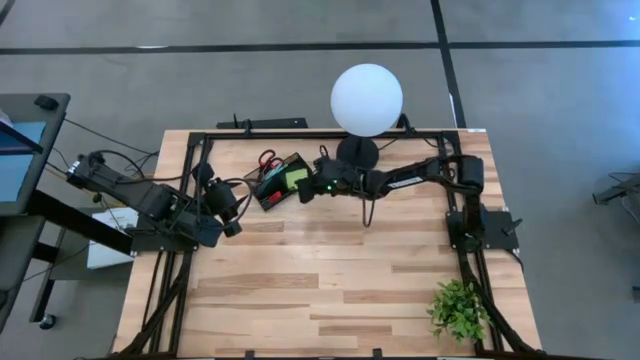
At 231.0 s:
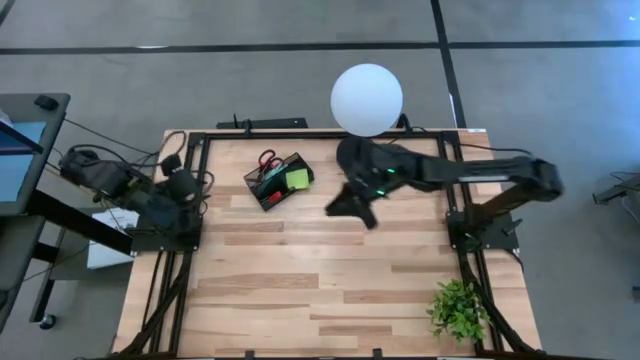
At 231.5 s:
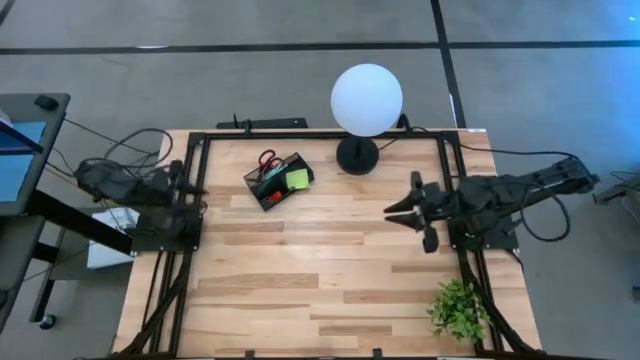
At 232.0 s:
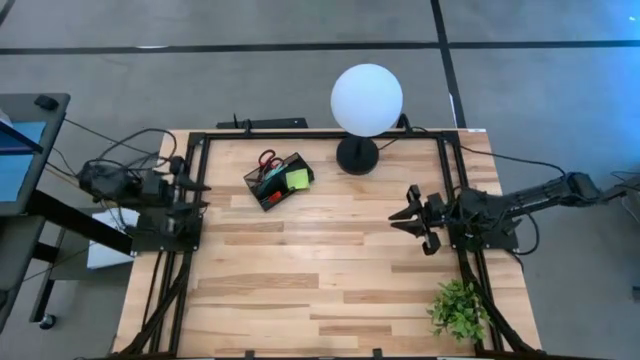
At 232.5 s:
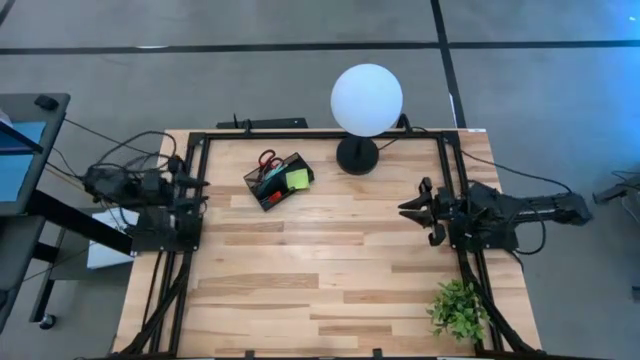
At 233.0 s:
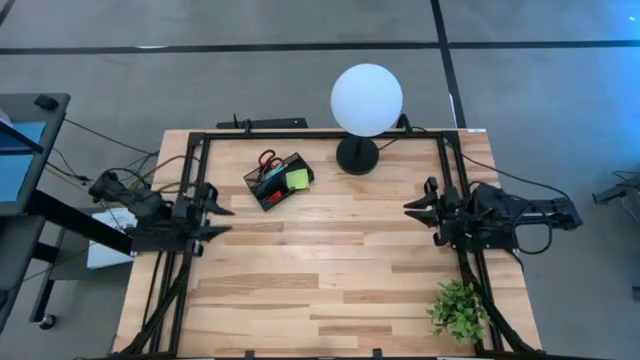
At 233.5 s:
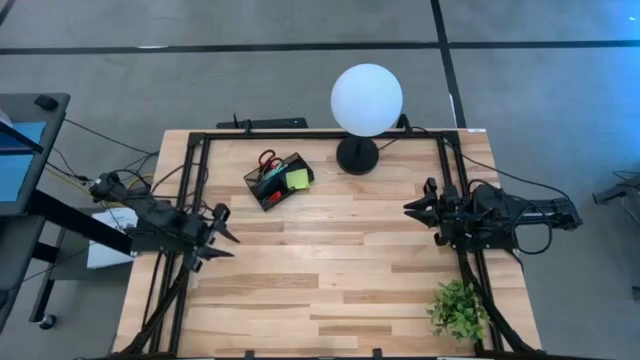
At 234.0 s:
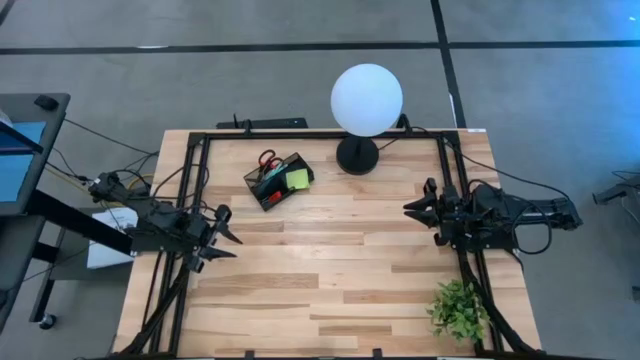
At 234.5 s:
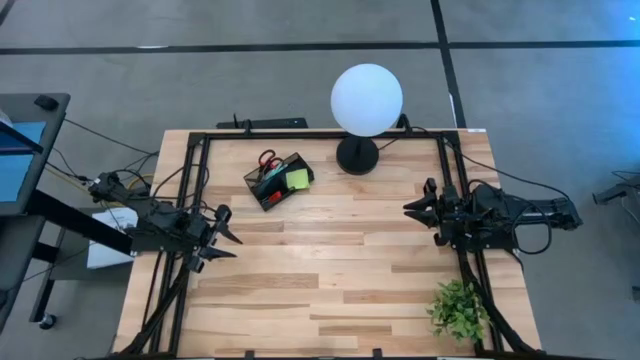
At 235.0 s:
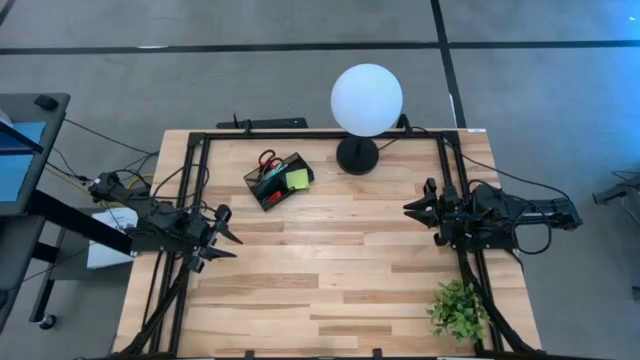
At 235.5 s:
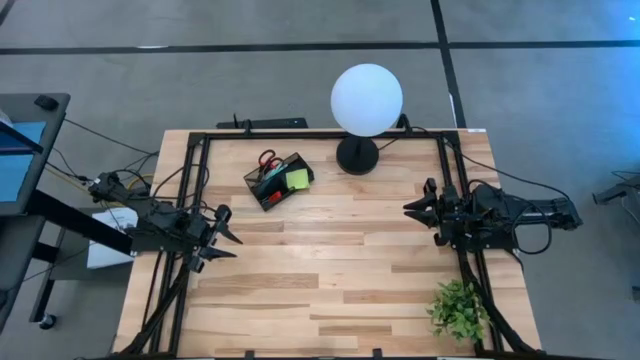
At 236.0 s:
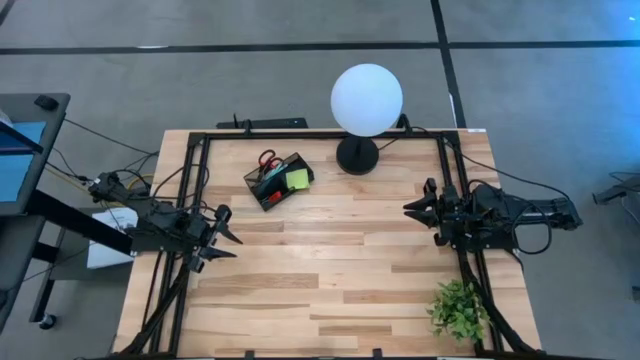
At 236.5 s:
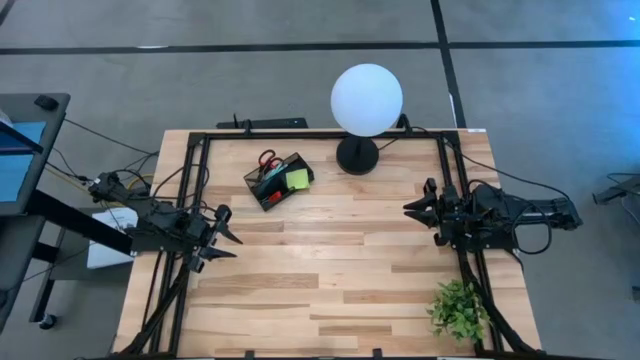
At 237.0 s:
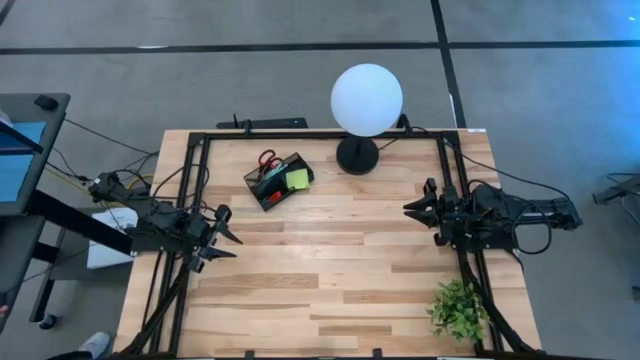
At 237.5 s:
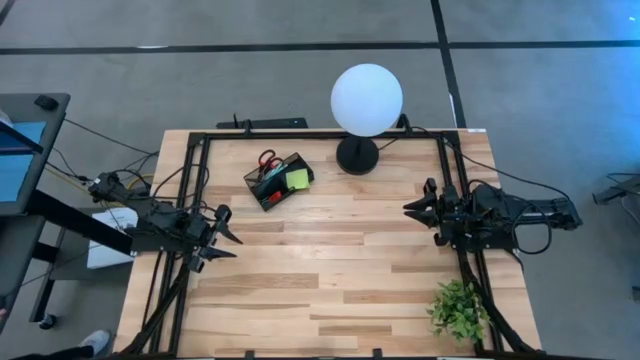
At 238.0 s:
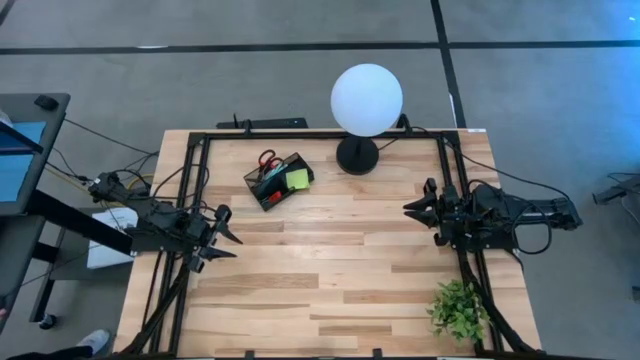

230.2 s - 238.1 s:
Task: Pick and place office supplies into organizer
Return to Home Position

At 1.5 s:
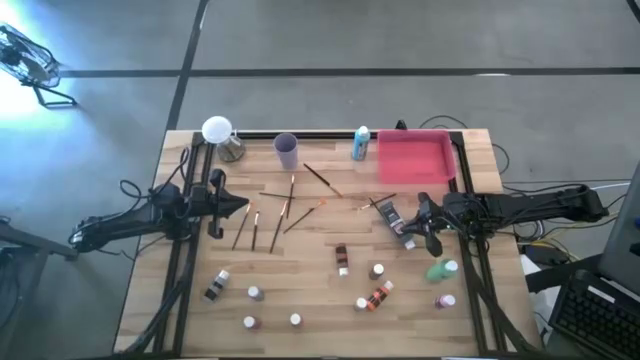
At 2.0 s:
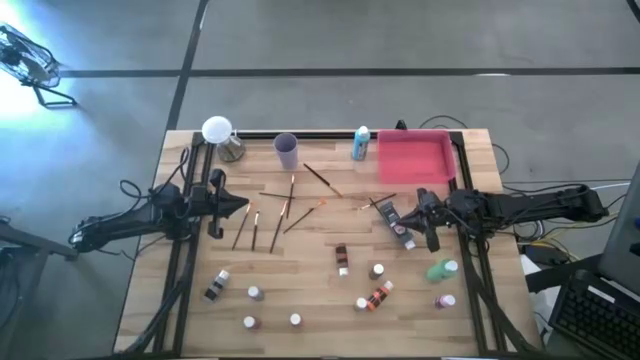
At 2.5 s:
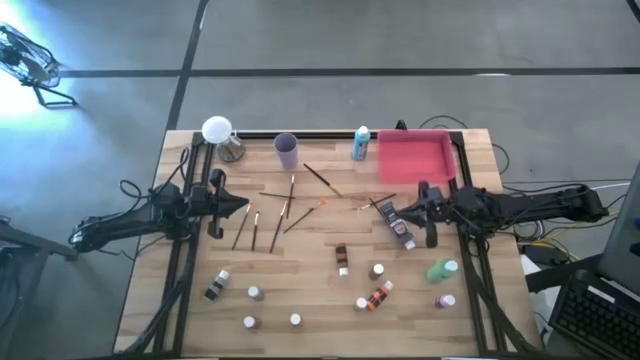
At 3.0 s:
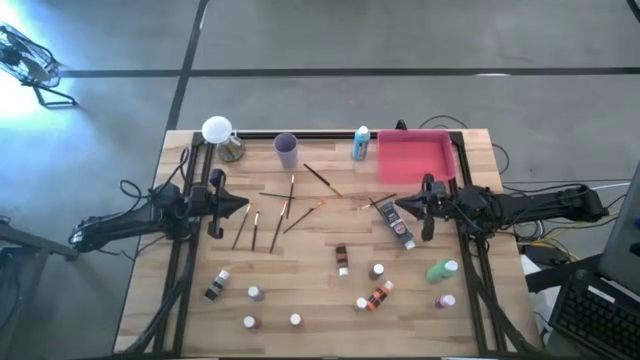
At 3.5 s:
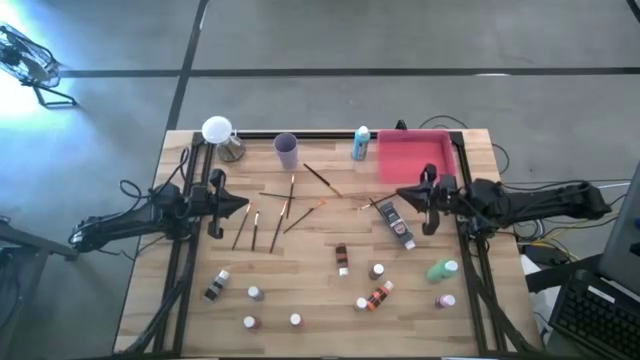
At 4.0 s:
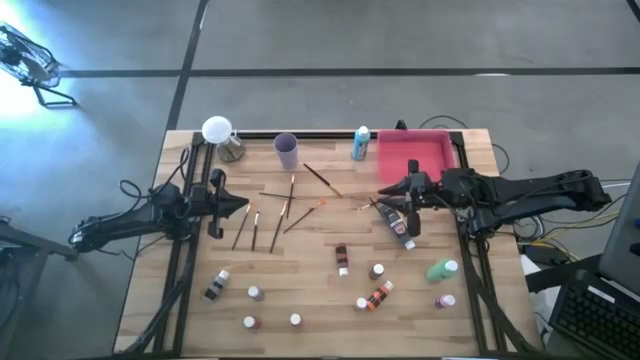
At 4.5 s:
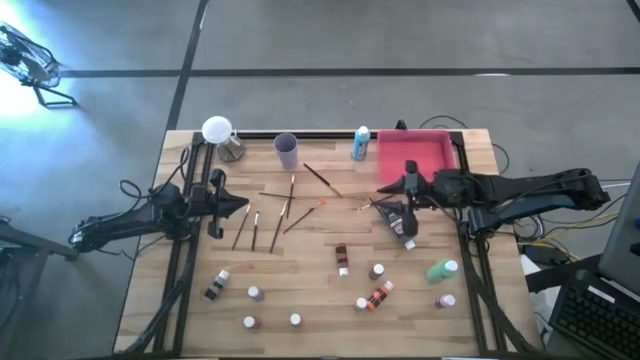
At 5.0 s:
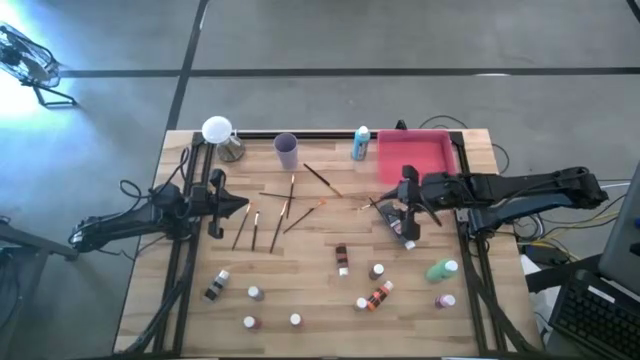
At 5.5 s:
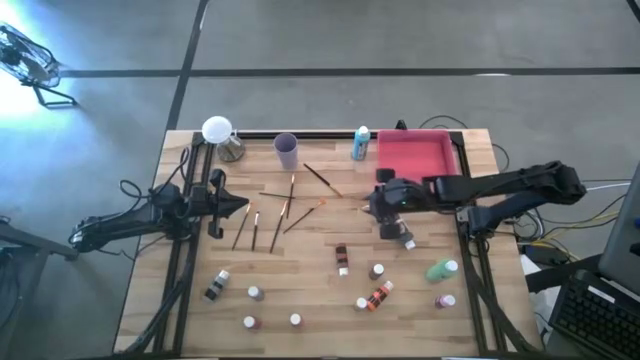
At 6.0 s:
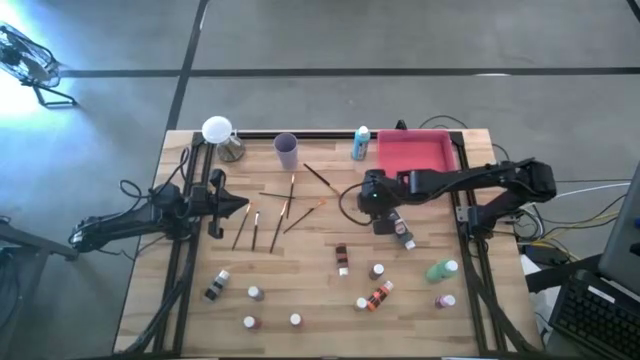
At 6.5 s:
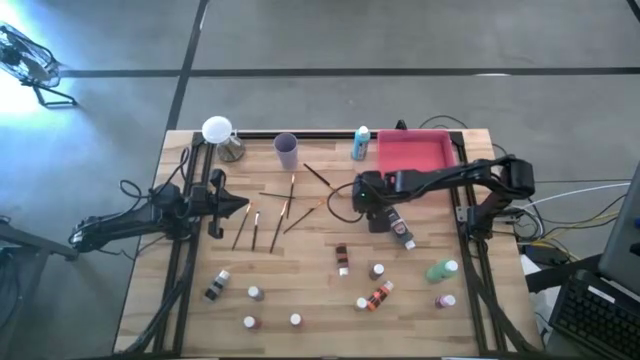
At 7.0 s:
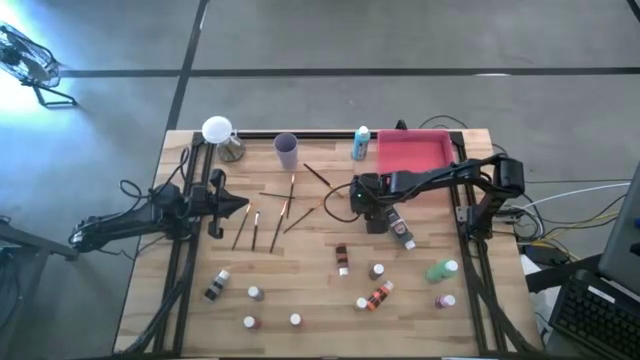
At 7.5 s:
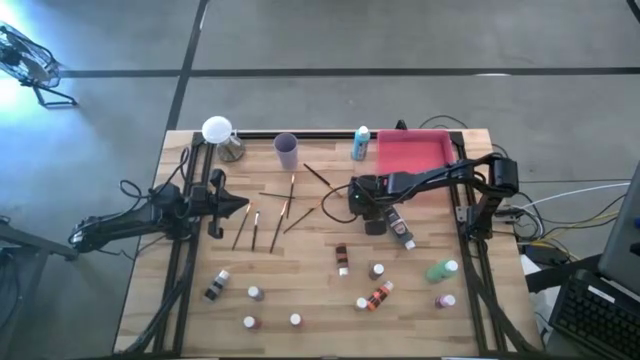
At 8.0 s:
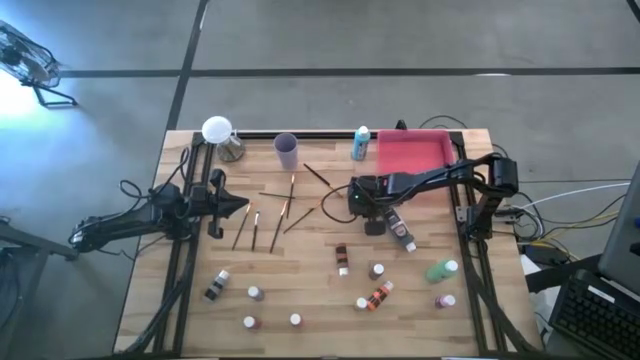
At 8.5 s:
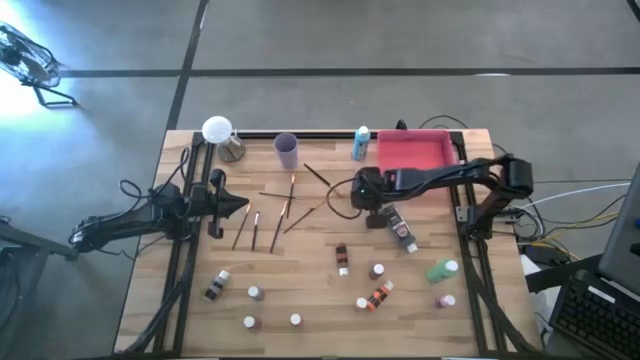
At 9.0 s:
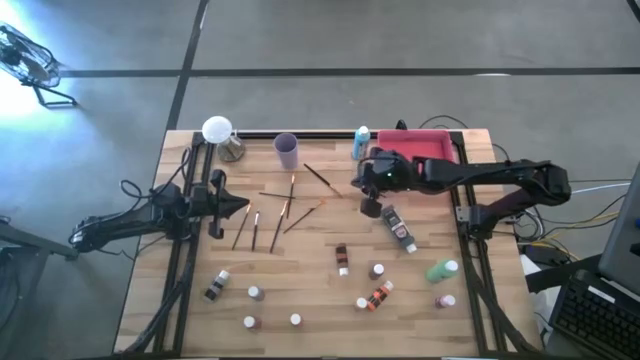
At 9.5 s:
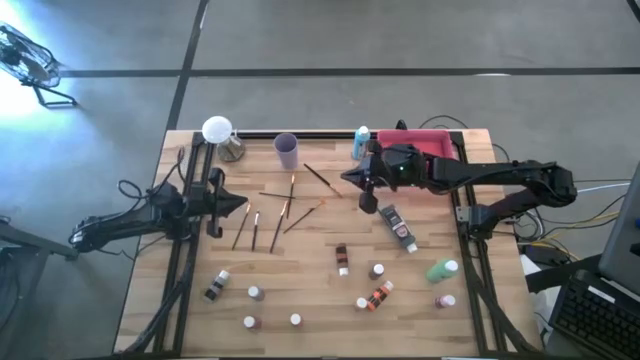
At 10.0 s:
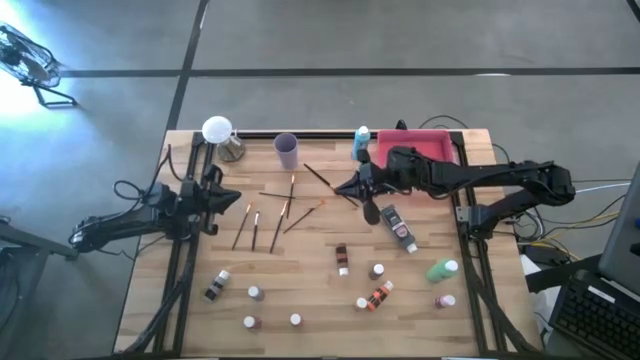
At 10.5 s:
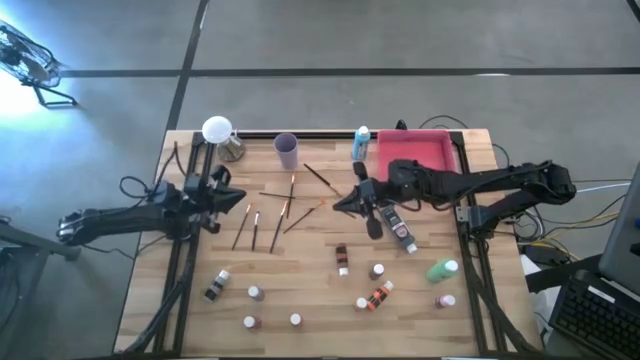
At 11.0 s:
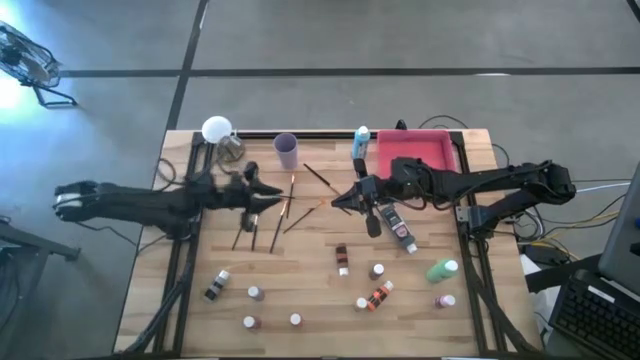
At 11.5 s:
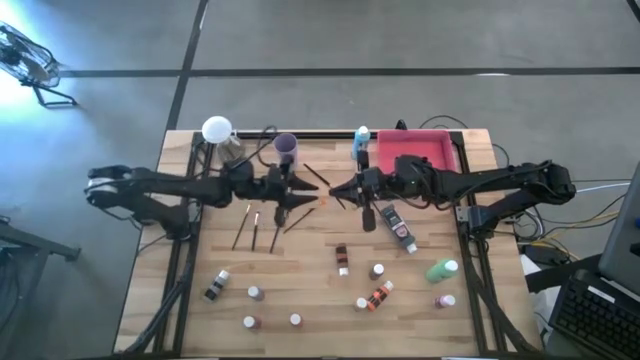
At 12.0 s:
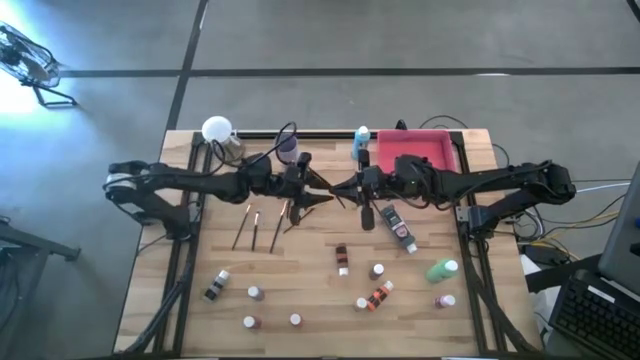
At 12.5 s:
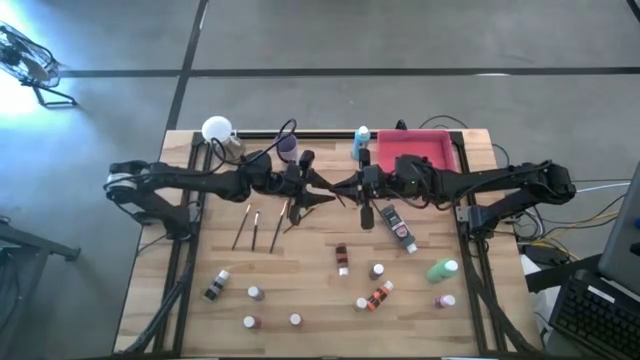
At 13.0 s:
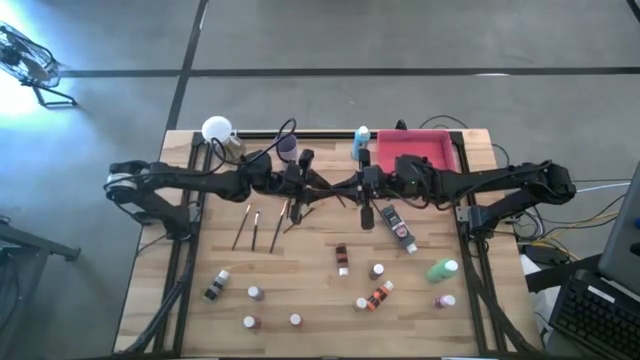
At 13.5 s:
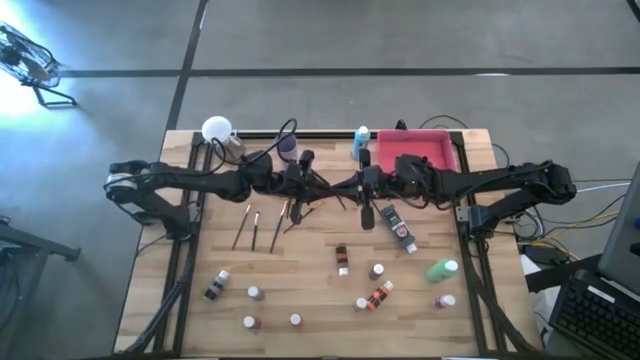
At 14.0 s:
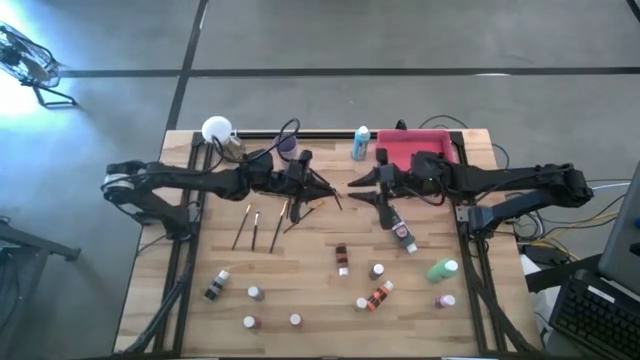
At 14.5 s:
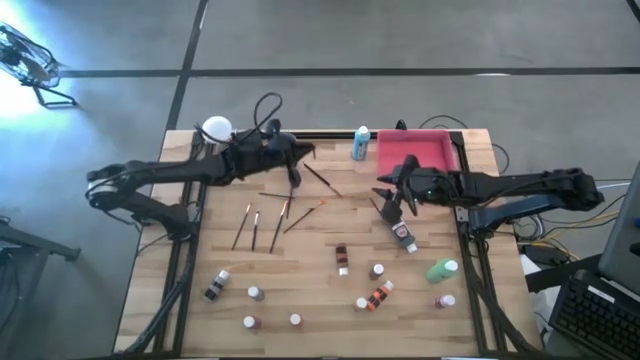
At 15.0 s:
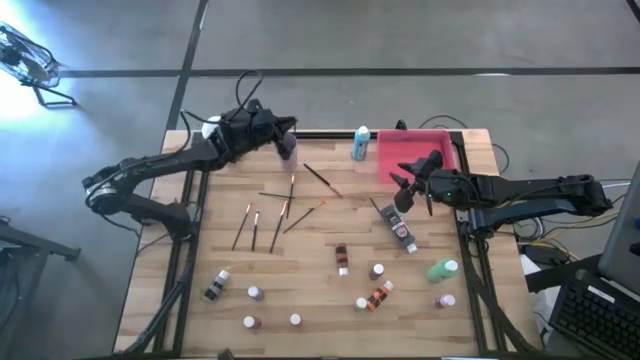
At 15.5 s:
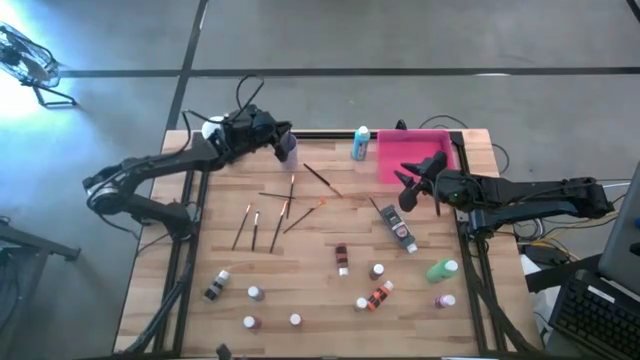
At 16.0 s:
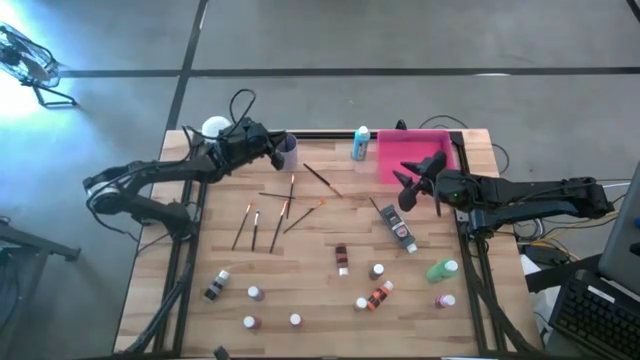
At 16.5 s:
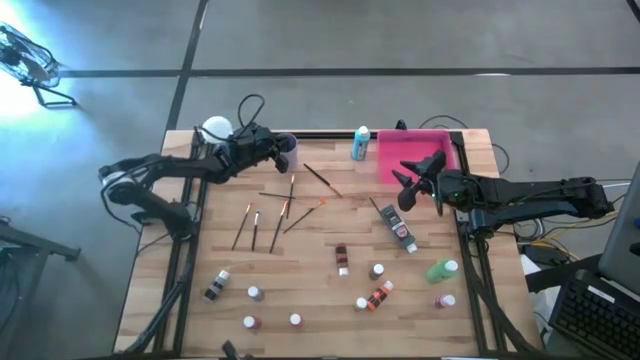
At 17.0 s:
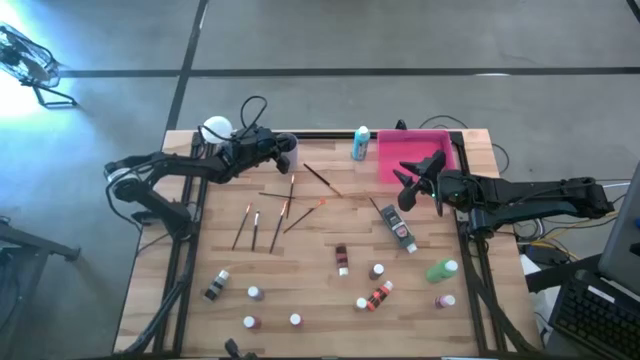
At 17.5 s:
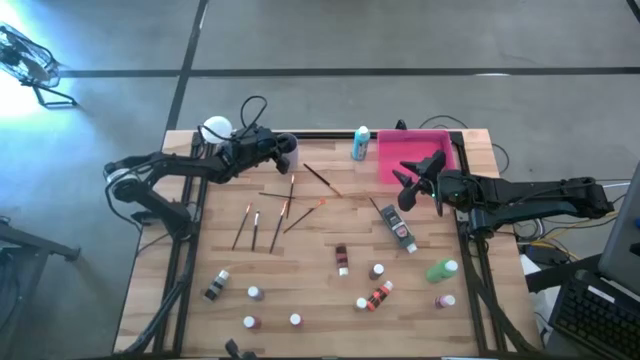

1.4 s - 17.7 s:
Task: Pick & Place Paint Supplies
Put the silver black paint brush into the purple cup
